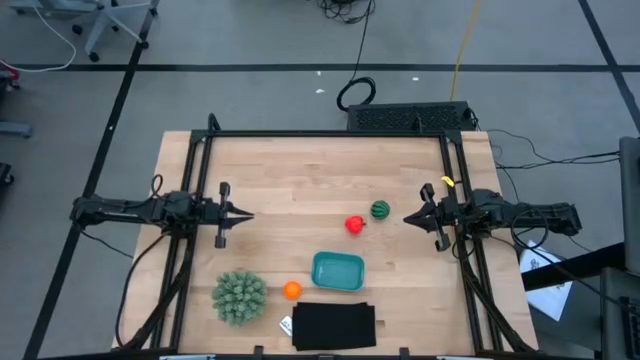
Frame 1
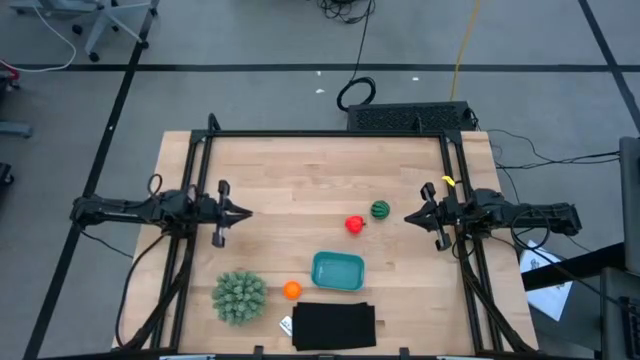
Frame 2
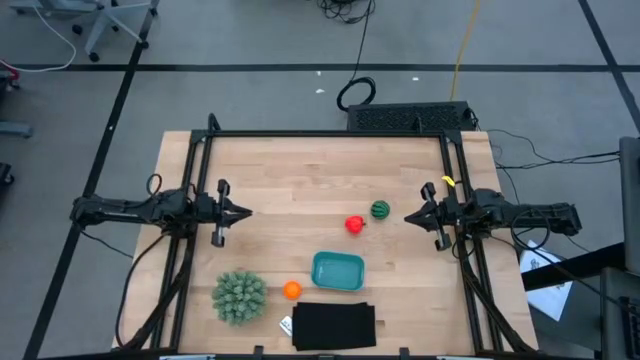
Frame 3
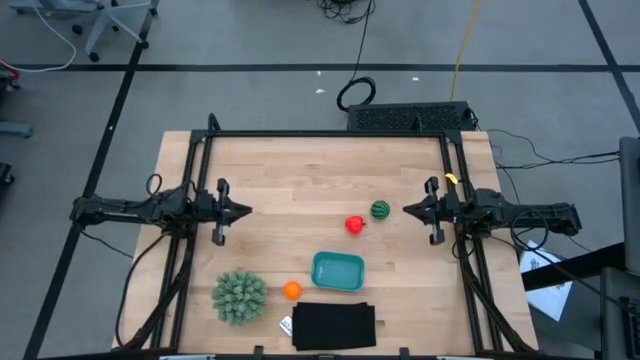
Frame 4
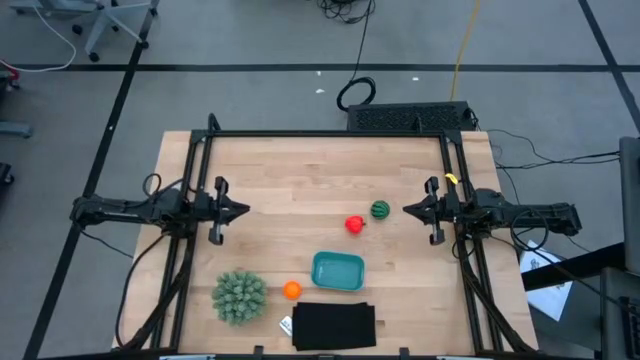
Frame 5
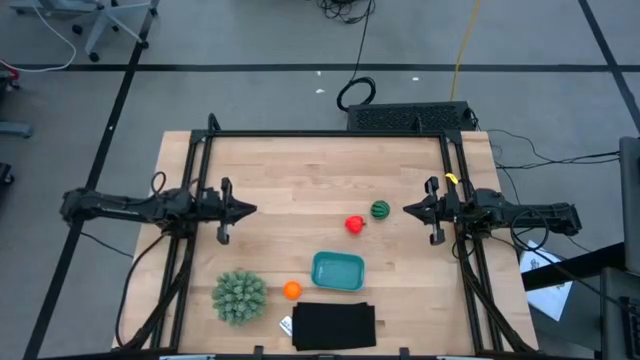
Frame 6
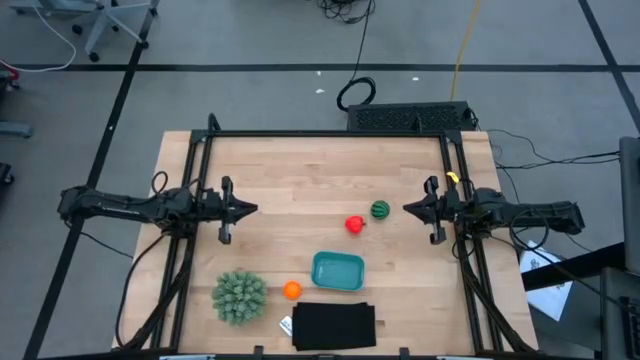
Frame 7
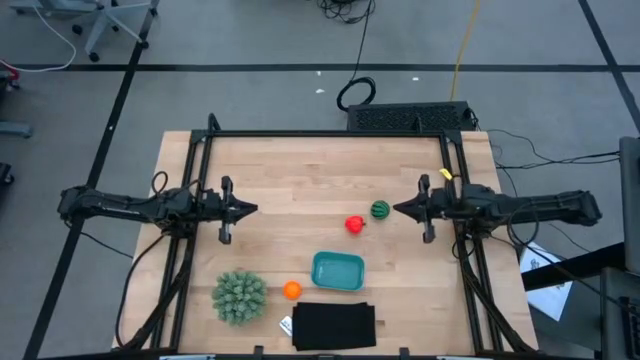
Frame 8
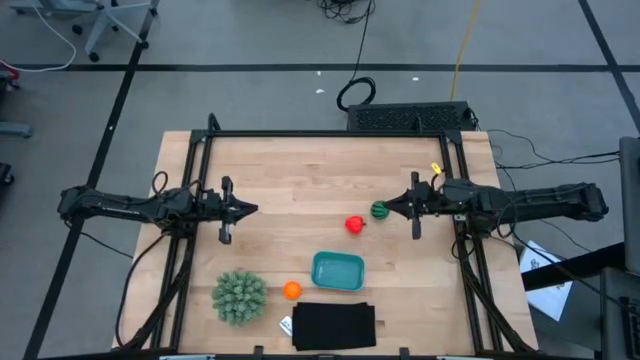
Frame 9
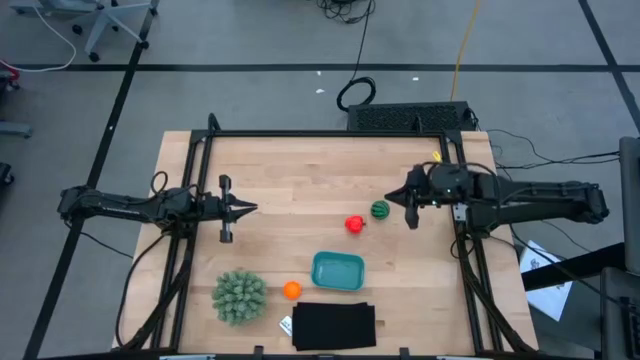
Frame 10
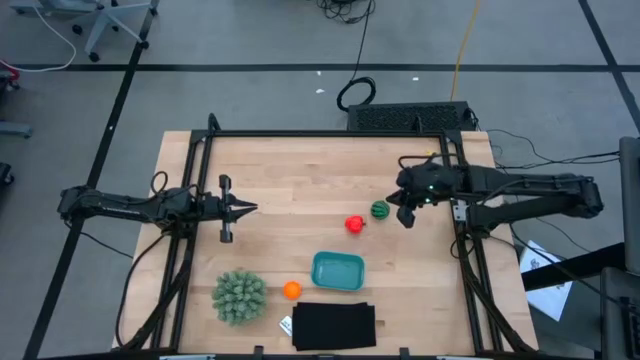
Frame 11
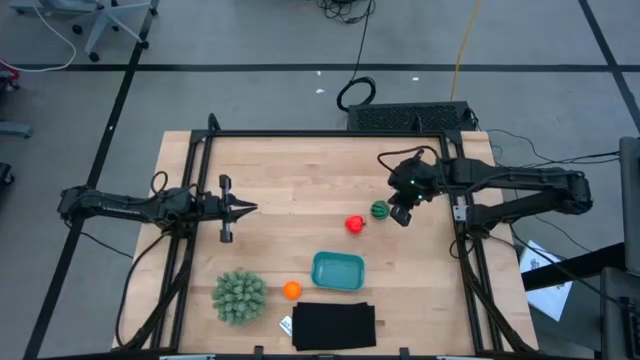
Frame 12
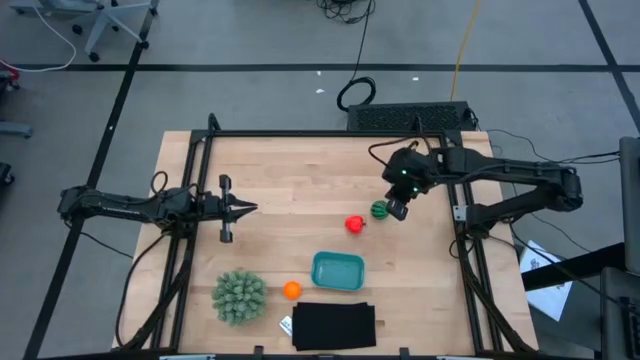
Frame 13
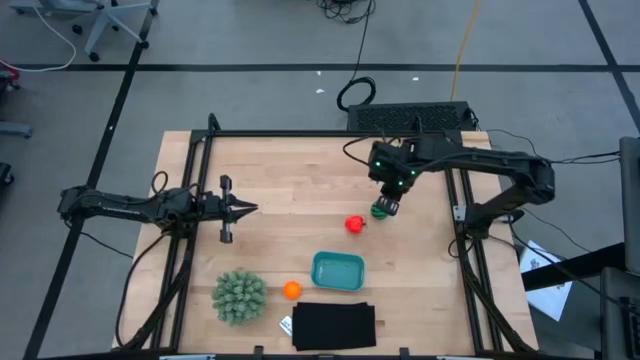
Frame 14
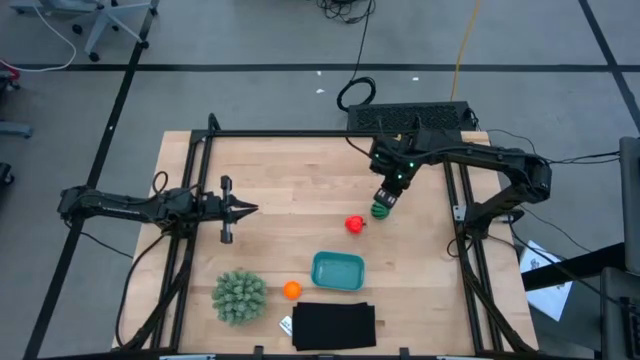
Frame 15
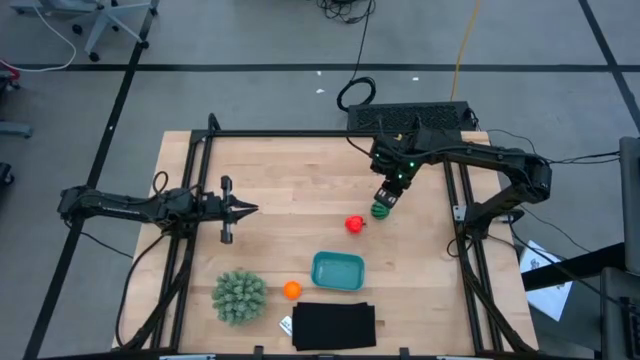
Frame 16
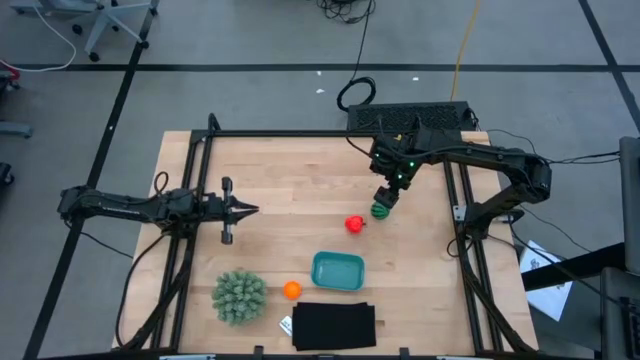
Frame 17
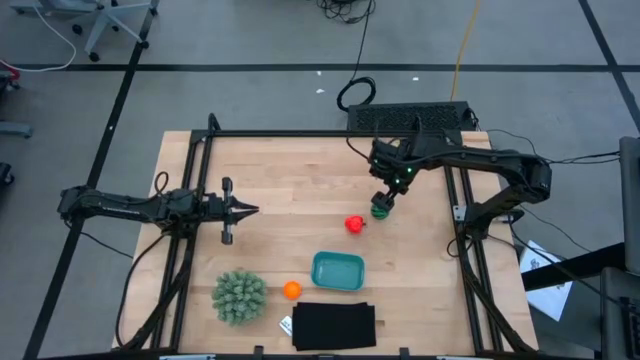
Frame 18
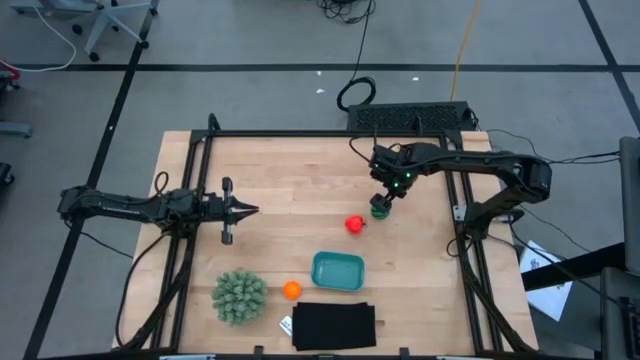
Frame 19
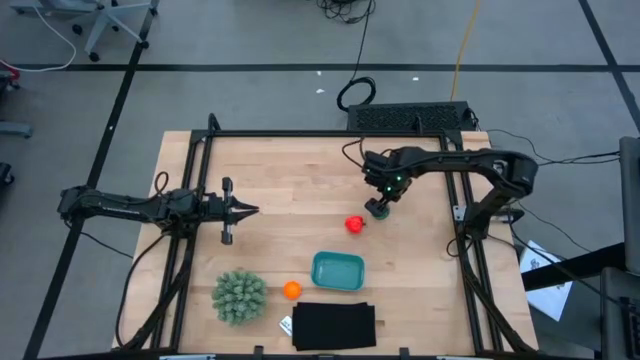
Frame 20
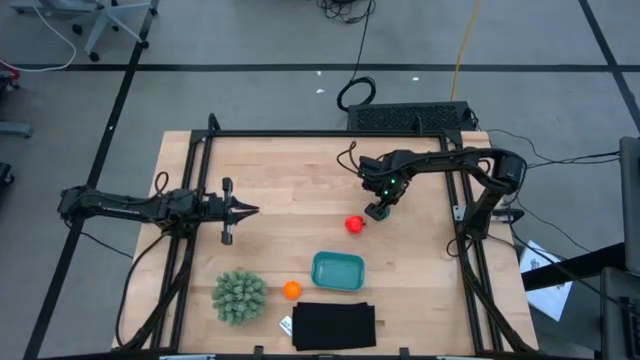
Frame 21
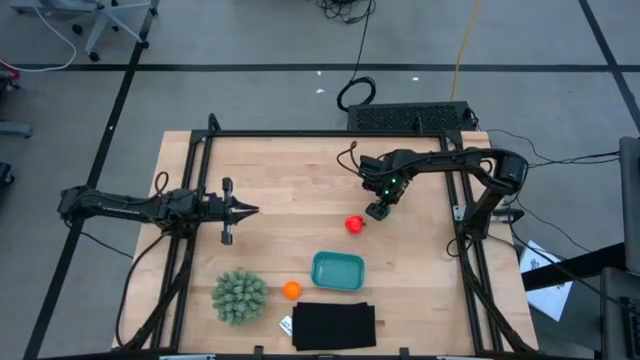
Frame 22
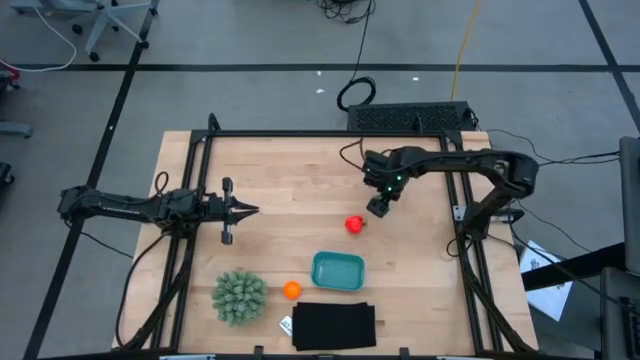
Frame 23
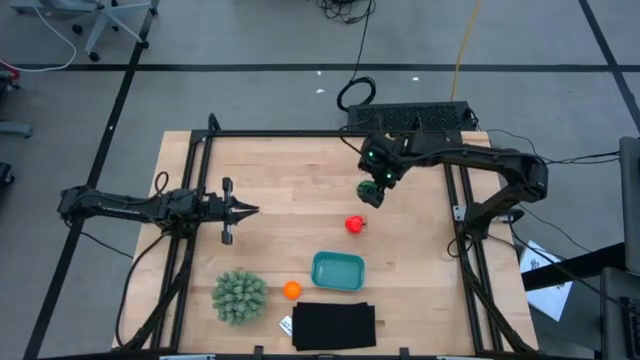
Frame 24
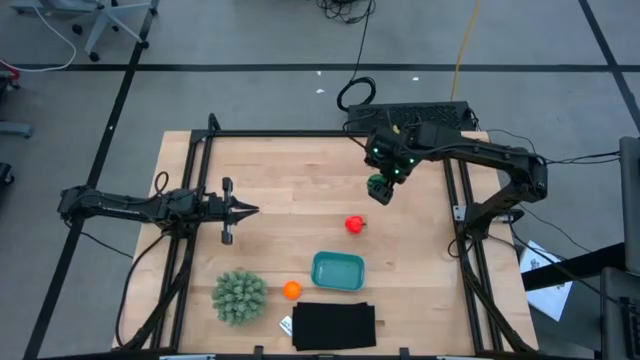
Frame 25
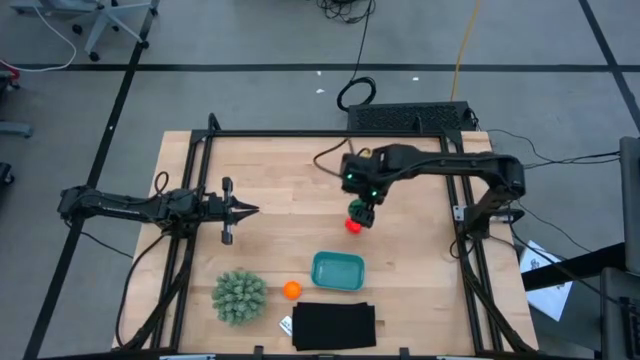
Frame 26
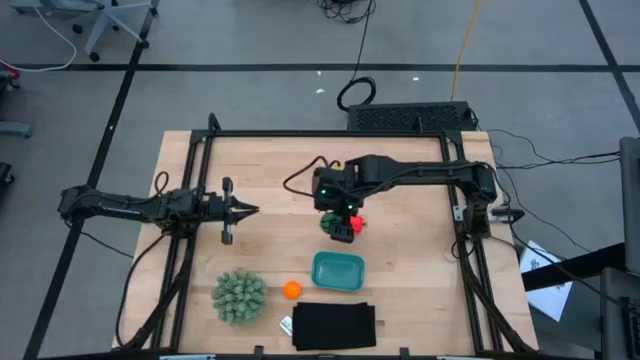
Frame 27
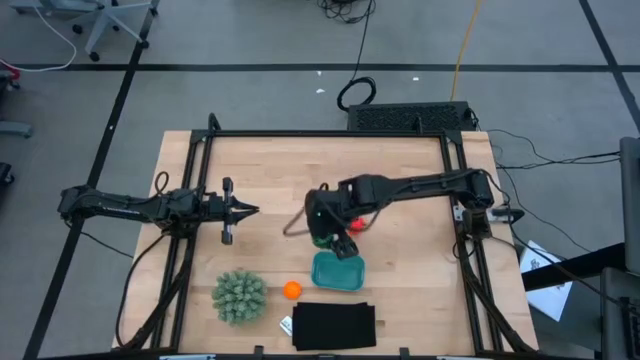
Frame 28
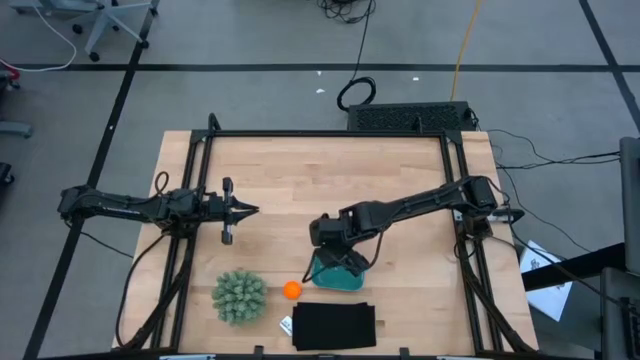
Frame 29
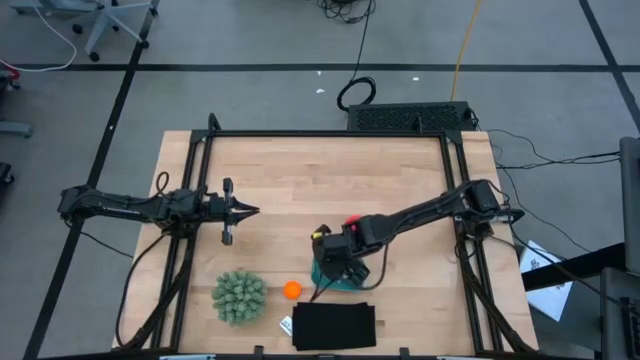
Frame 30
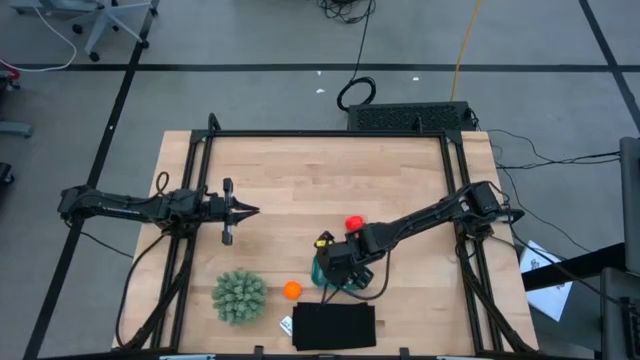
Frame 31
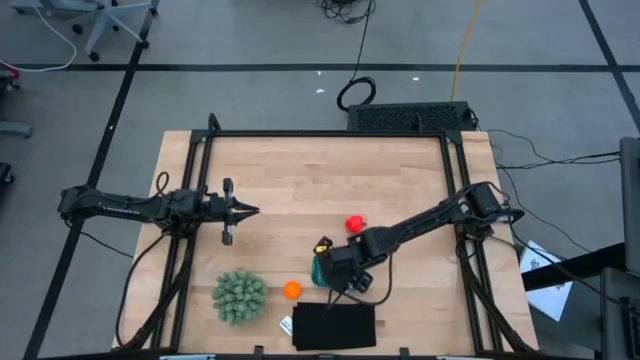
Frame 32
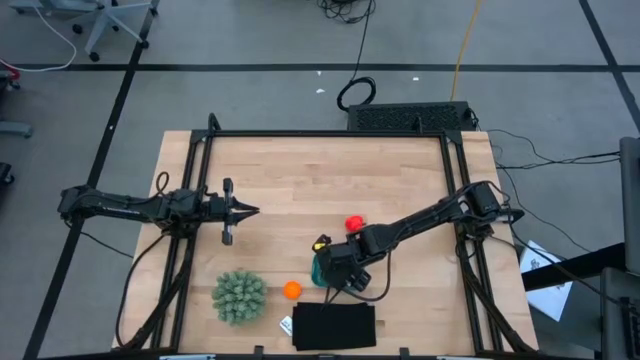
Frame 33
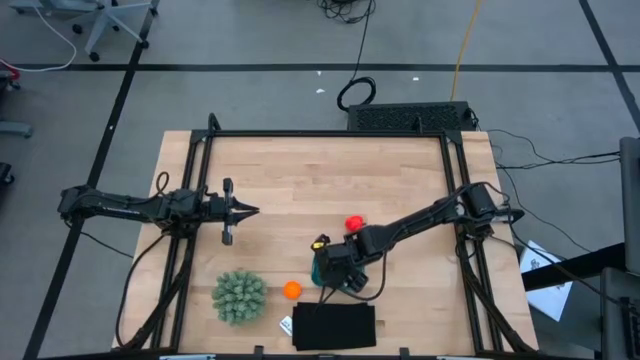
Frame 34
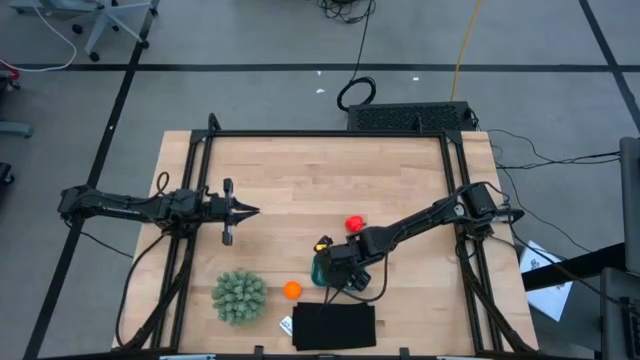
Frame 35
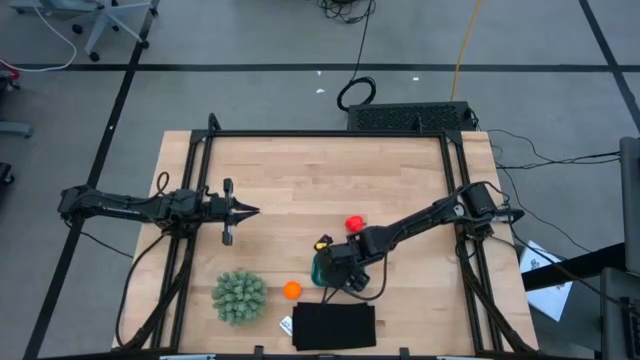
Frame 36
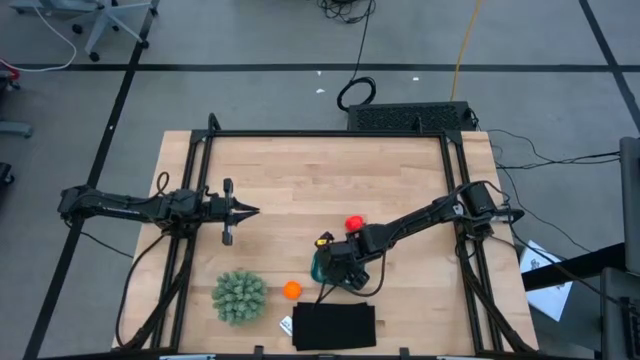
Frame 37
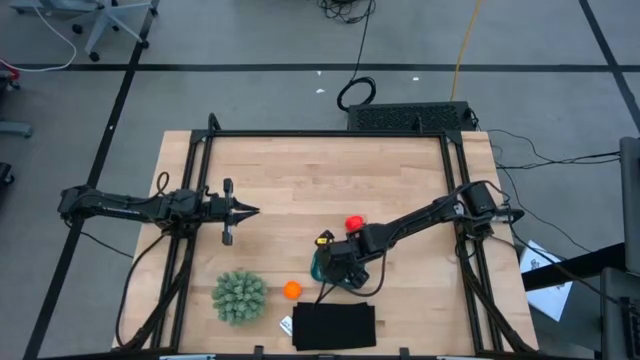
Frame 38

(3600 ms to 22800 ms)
Task: Pick and placing Produce into tupperware
Put the green watermelon into the blue bin
